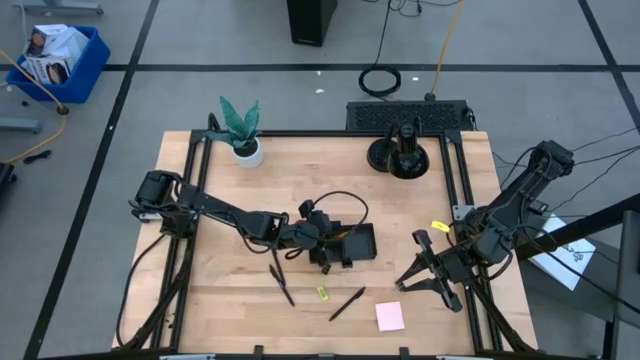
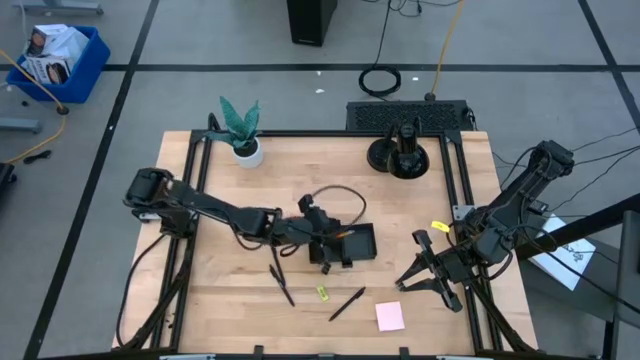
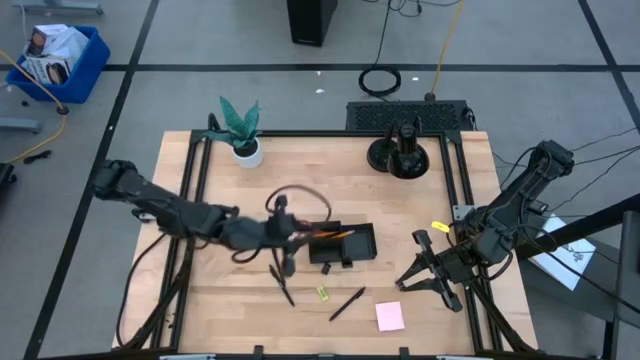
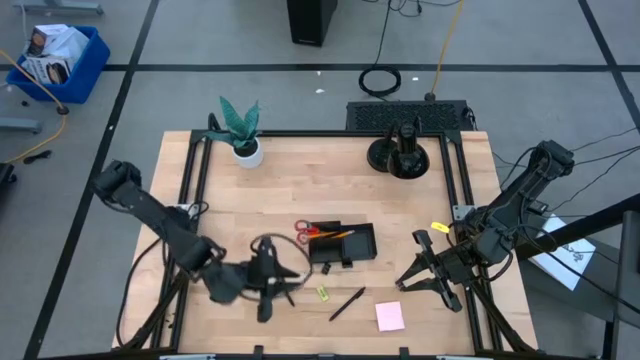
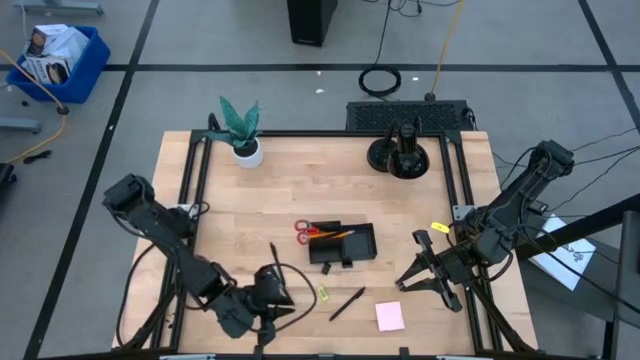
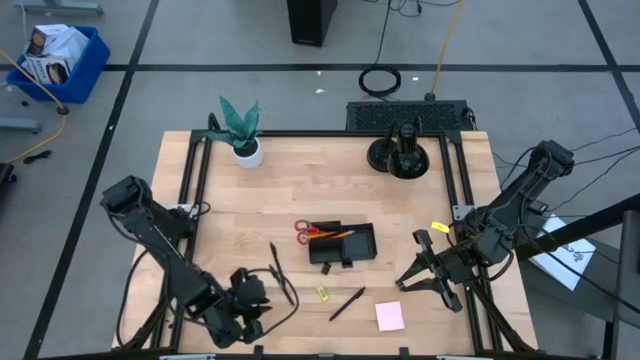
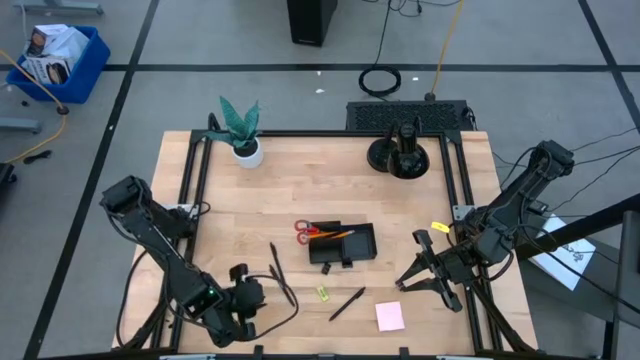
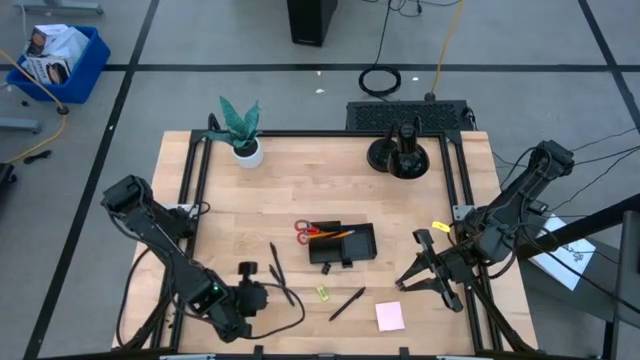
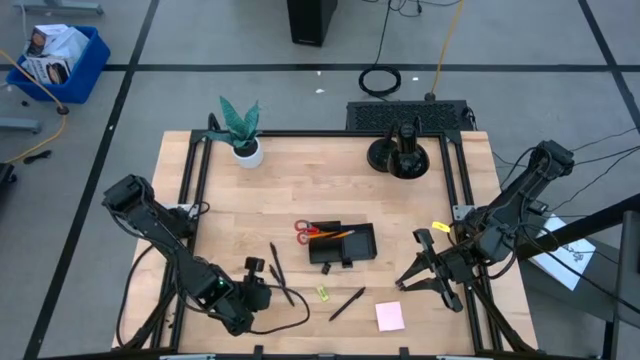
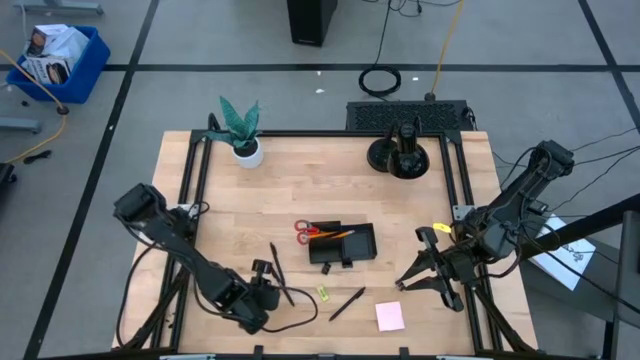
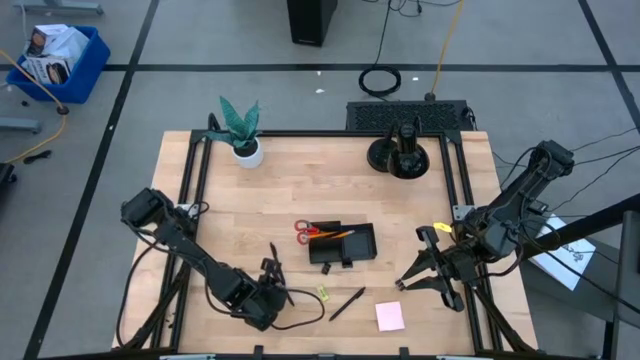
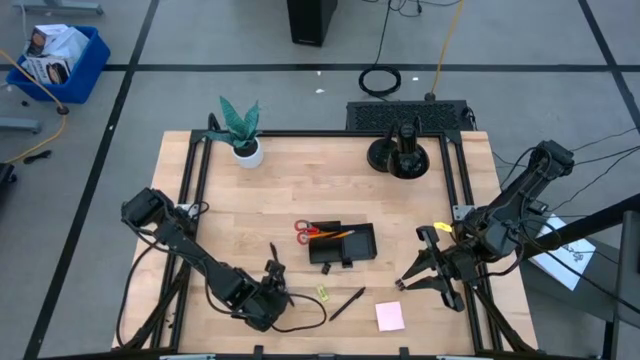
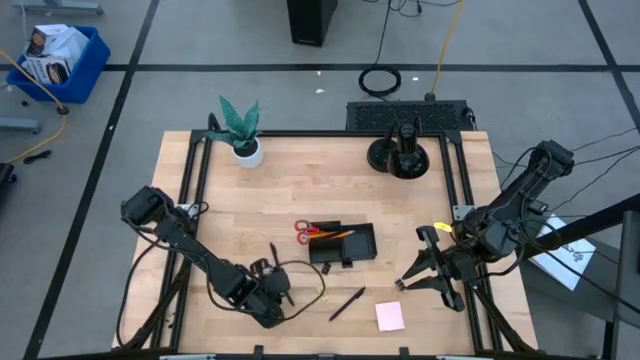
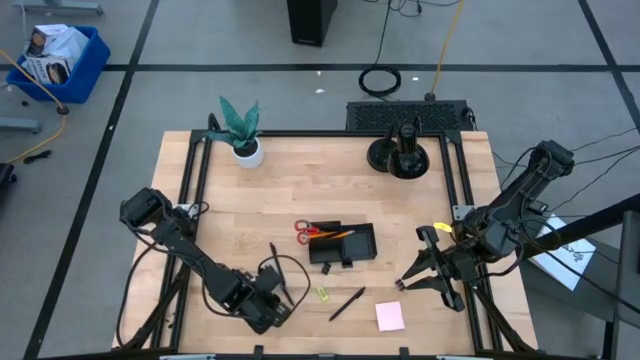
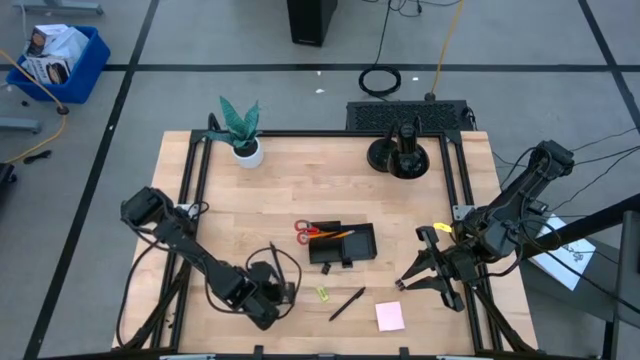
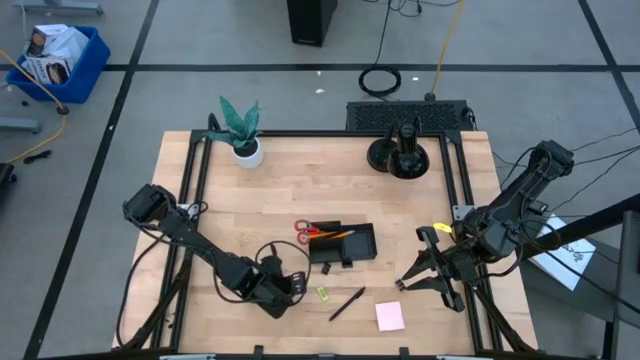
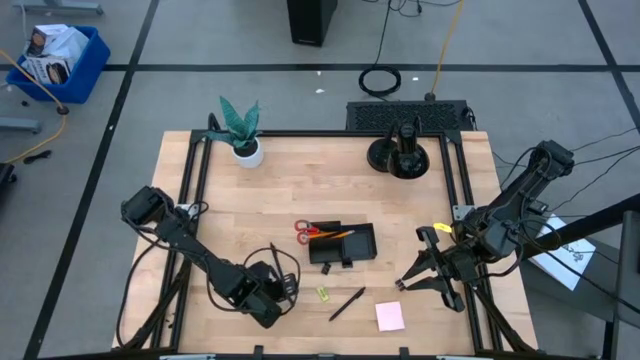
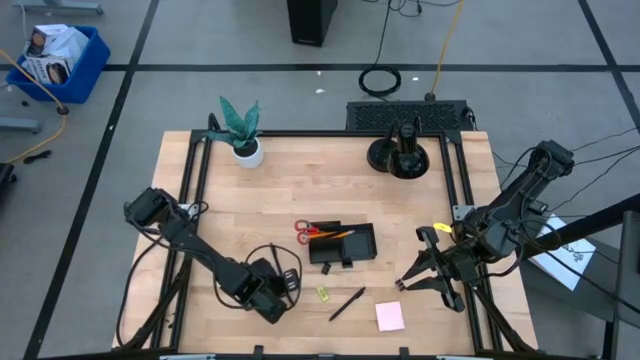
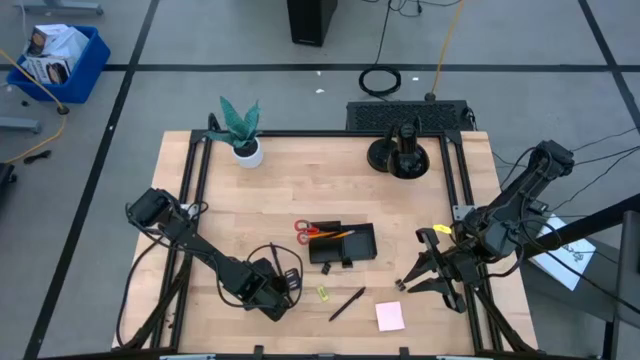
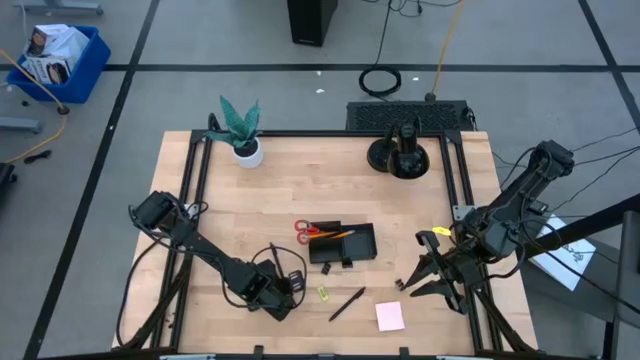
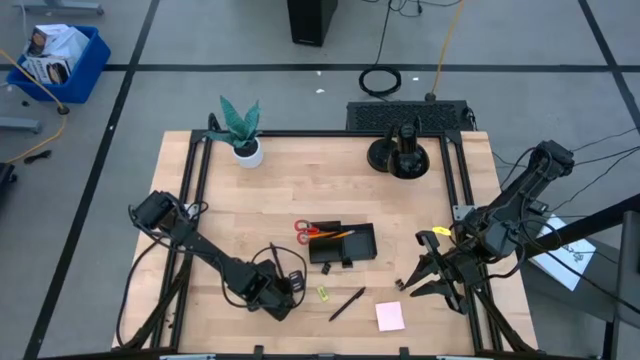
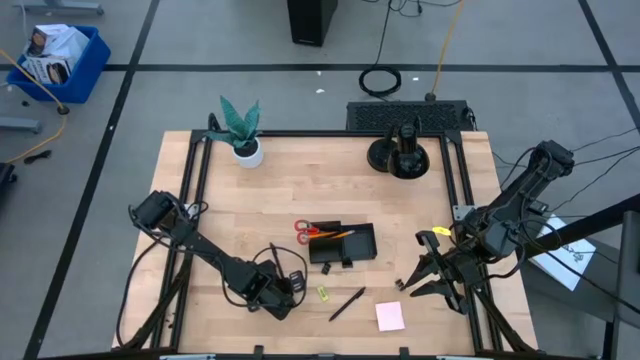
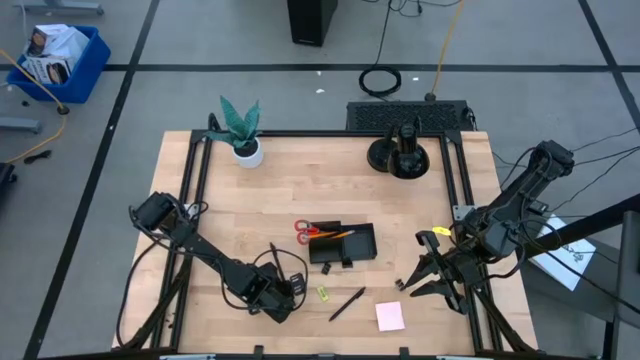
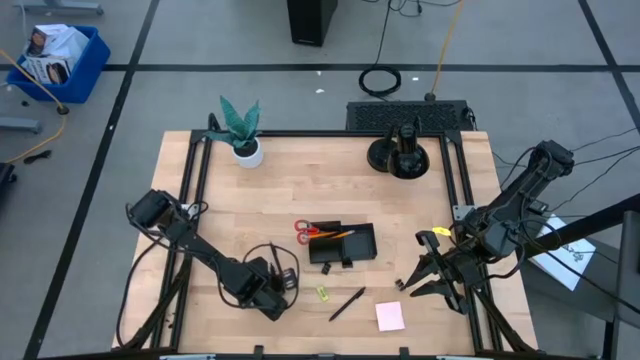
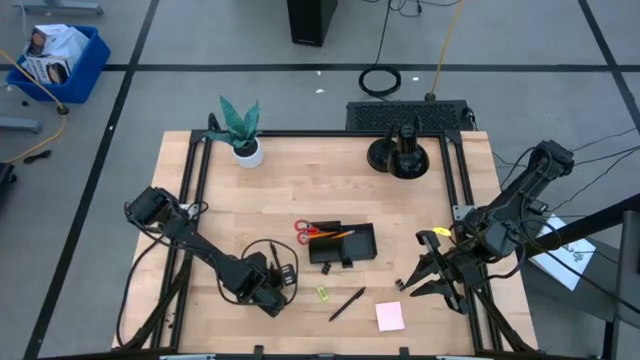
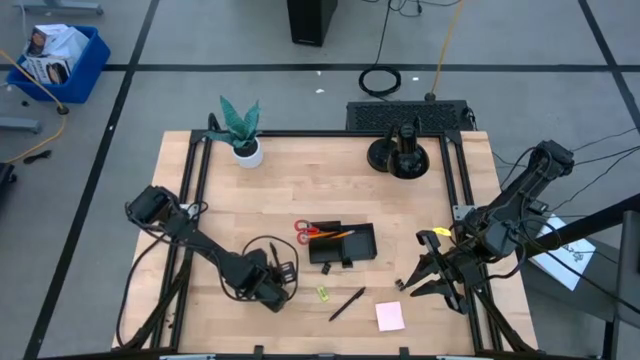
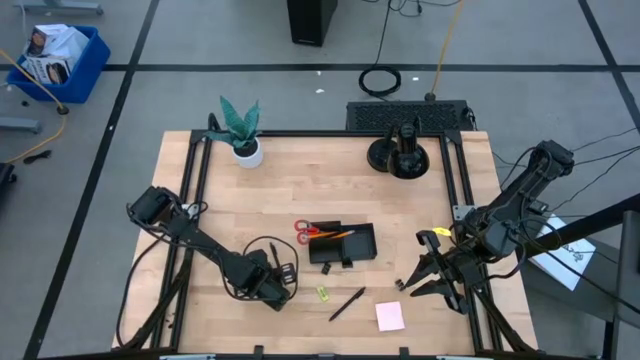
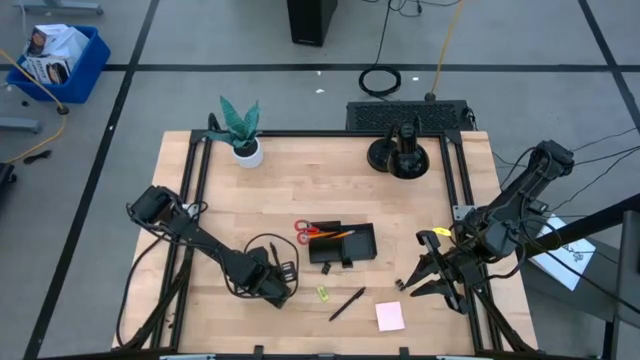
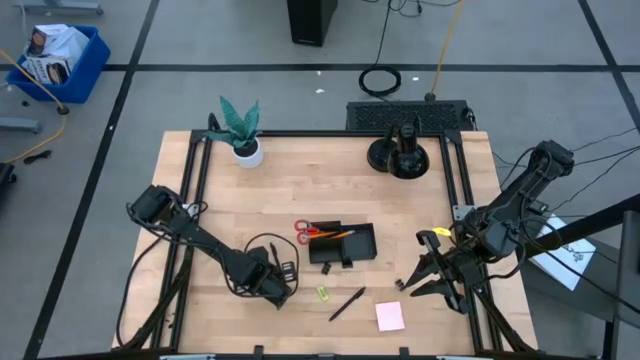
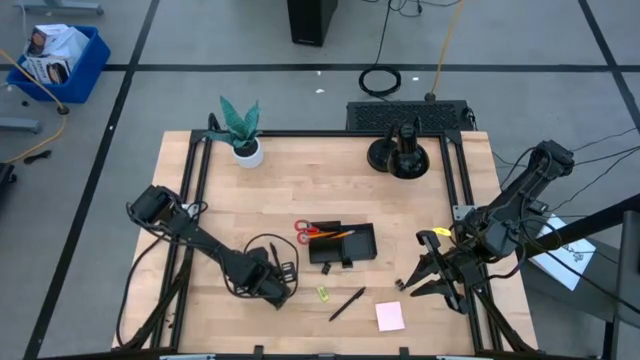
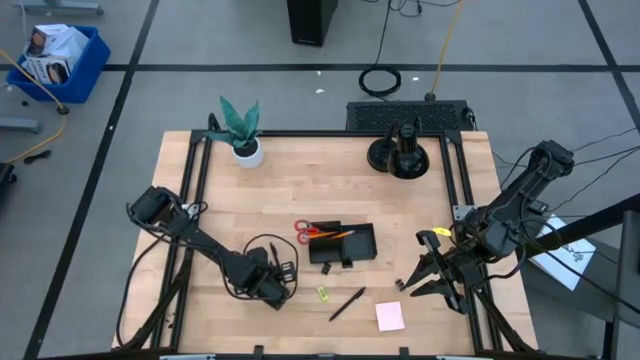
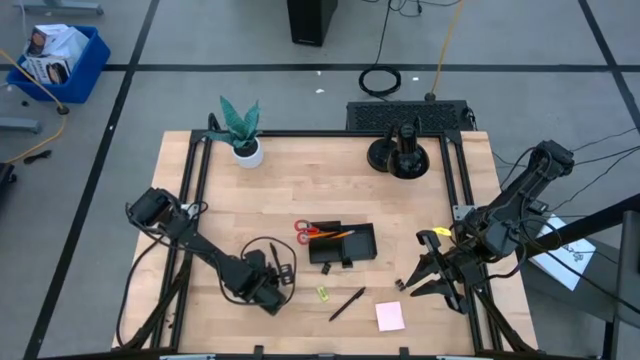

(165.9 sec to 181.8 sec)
Task: Pick and place office supplies into organizer
Put the bottom left black pen into the black desk organizer

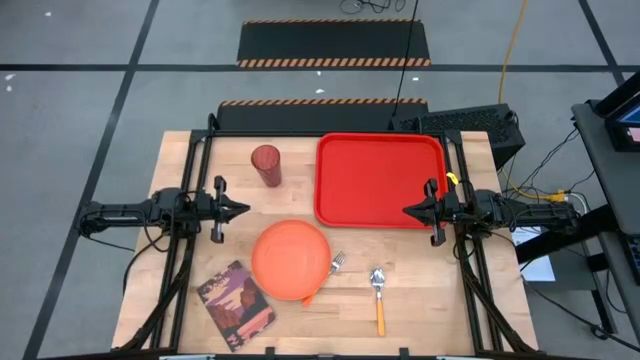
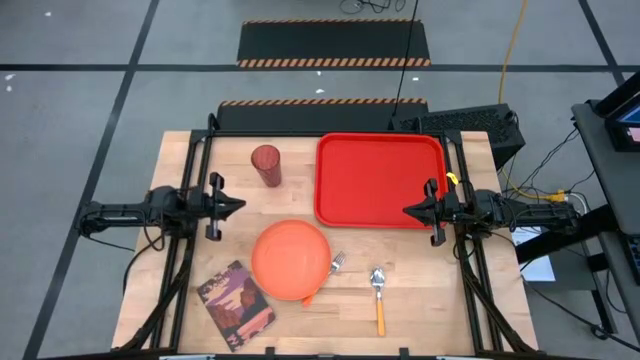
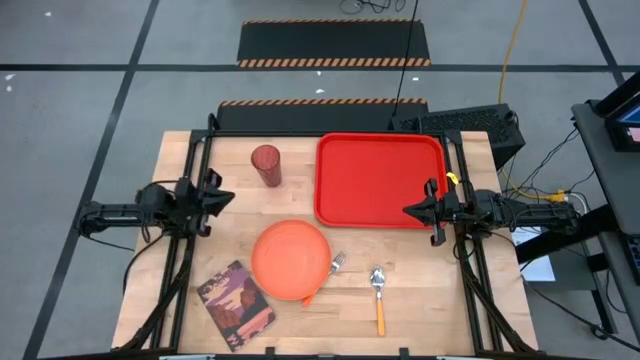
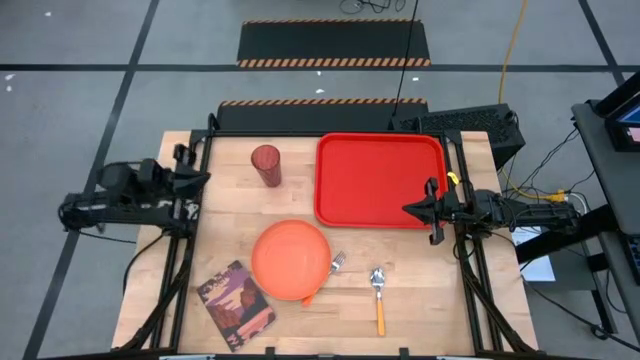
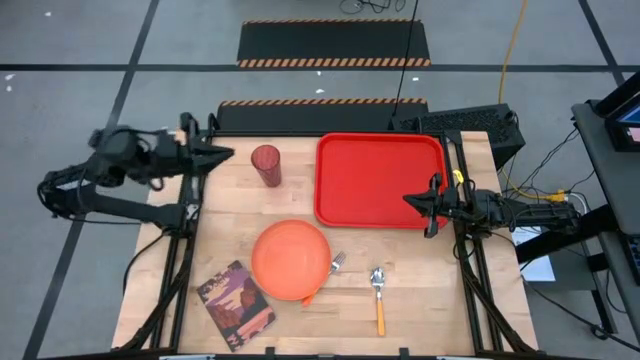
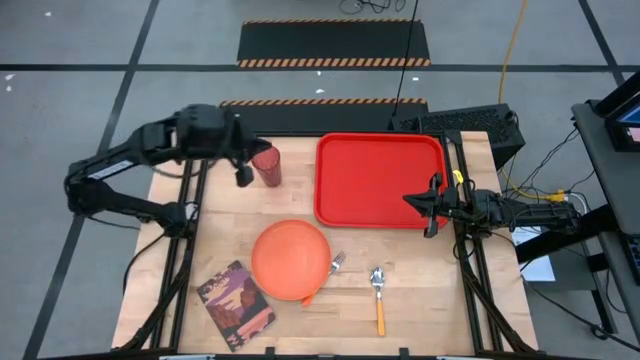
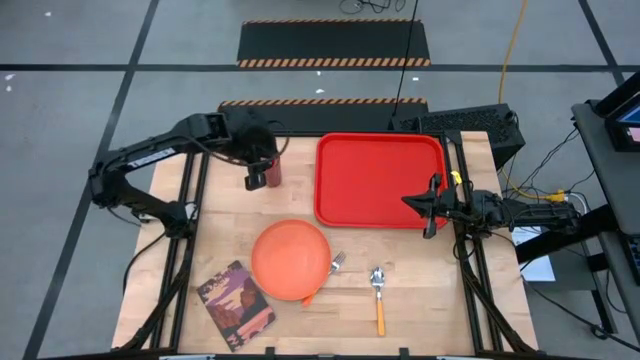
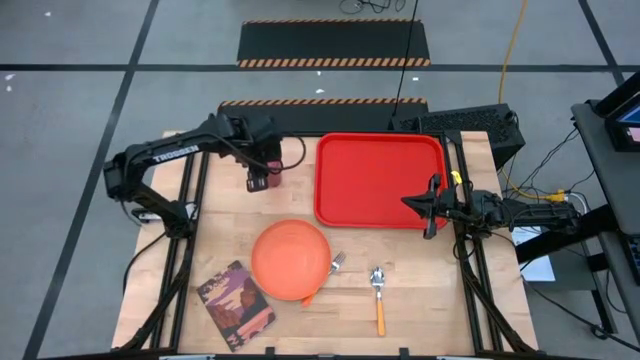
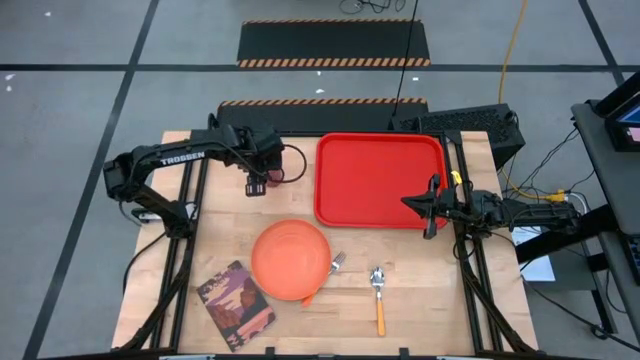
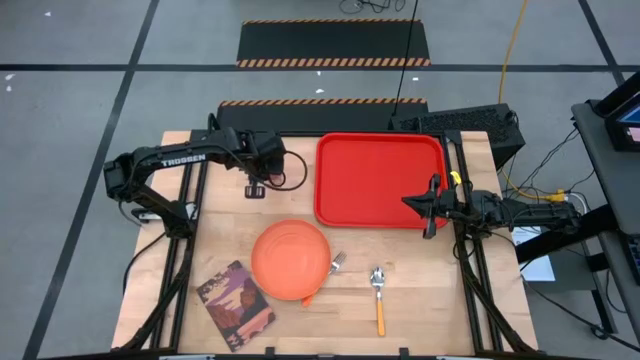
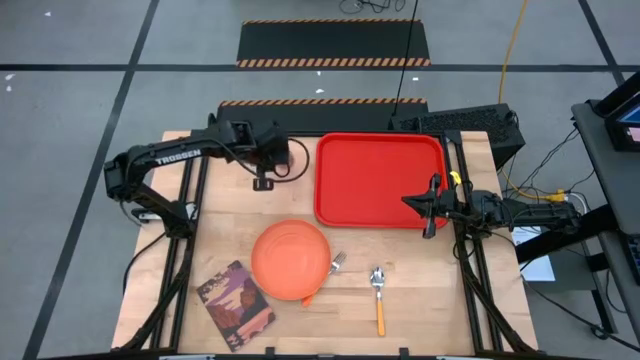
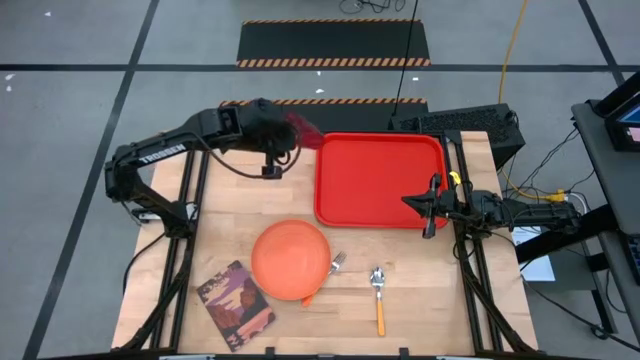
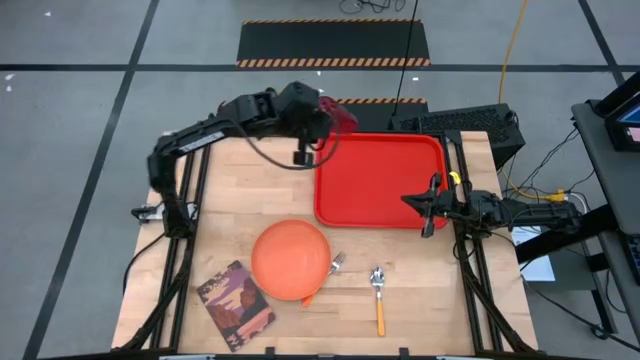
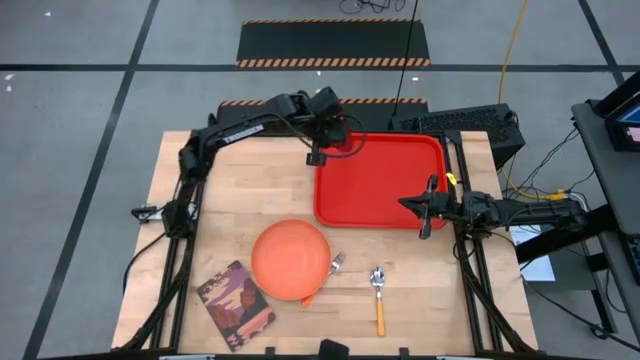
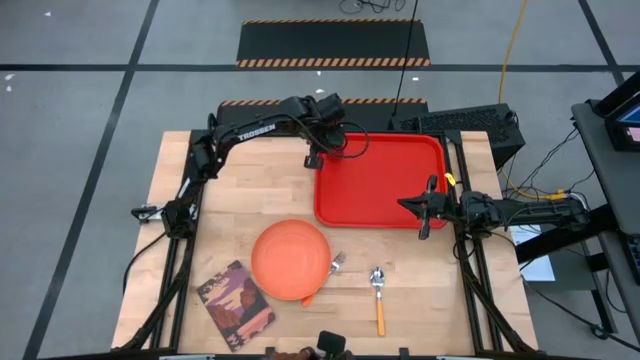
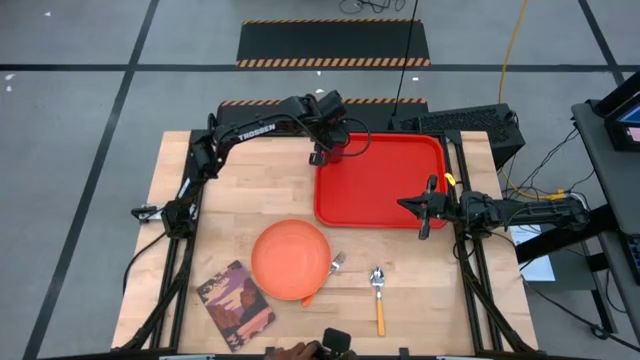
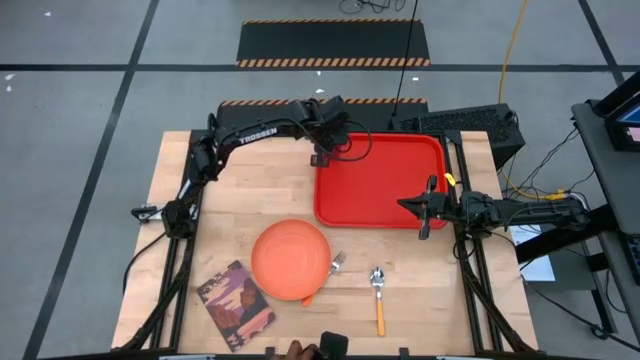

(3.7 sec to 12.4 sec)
Task: Pick and place plate/cup/fork/spoon on tray
Put the red glass on the top left of the red tray
